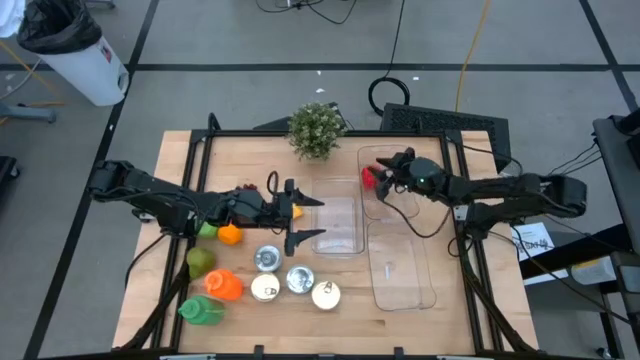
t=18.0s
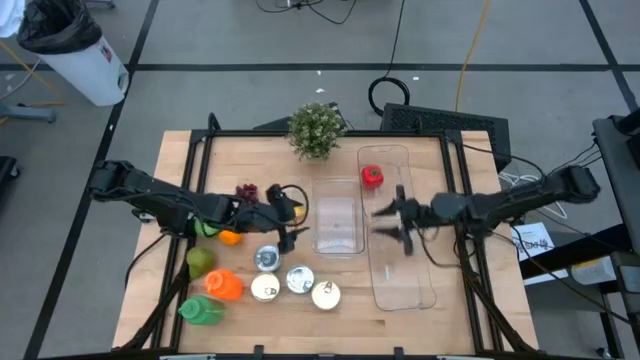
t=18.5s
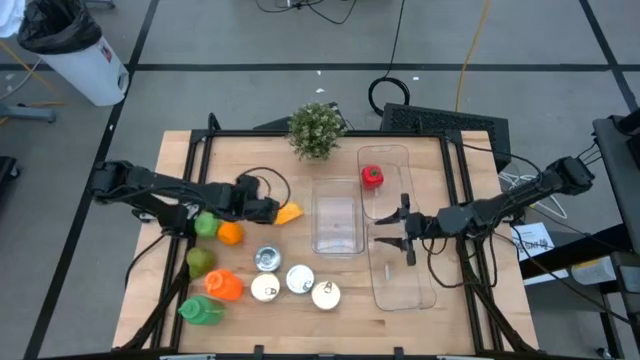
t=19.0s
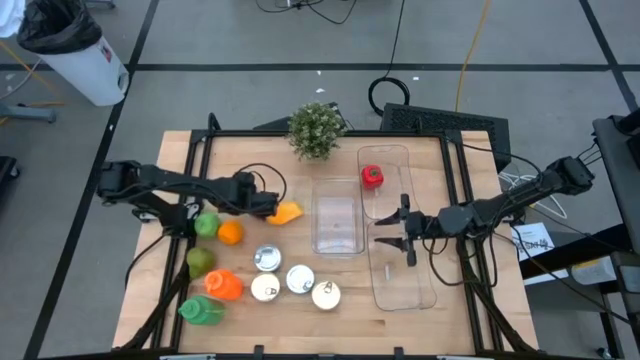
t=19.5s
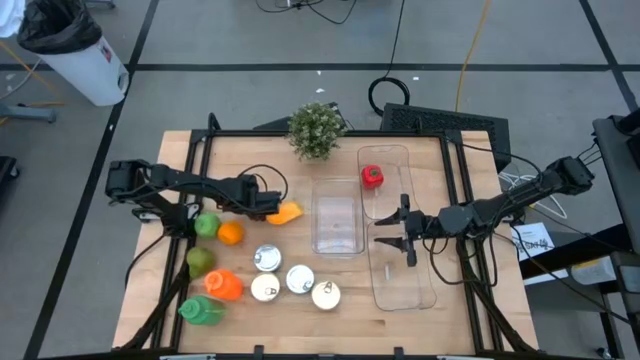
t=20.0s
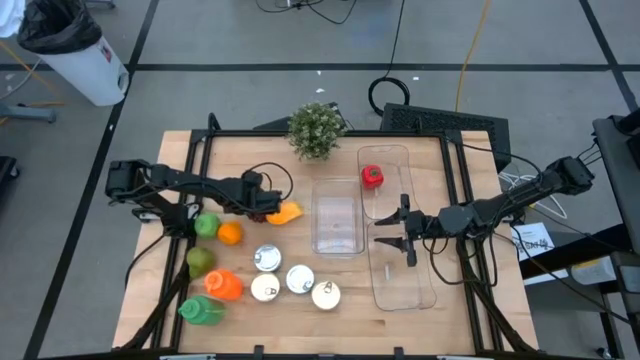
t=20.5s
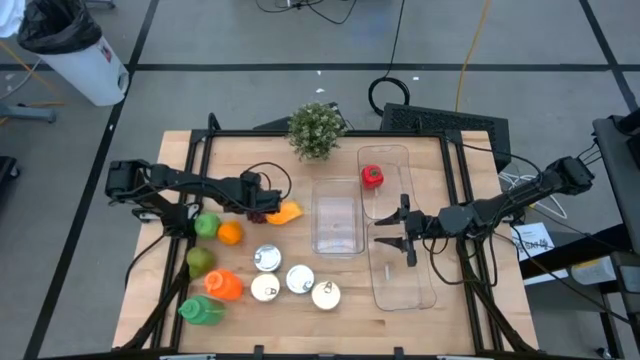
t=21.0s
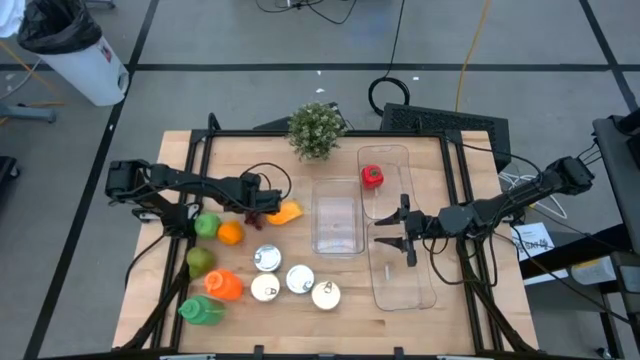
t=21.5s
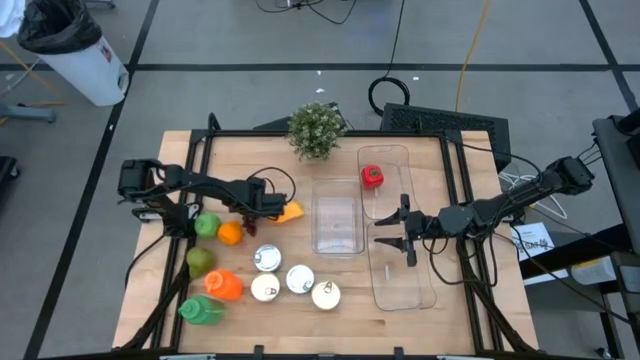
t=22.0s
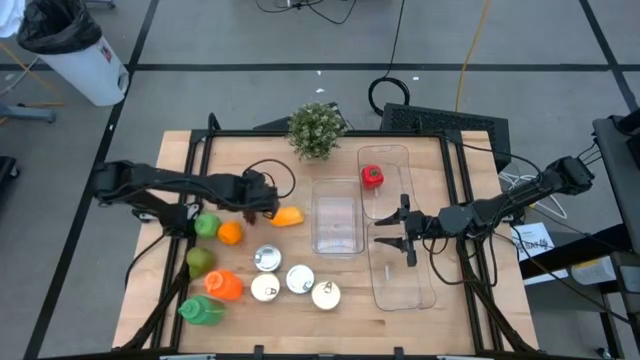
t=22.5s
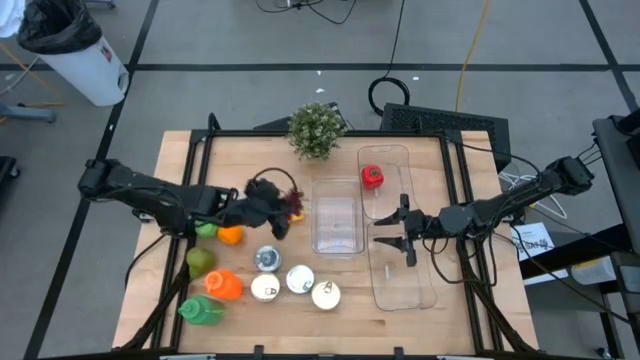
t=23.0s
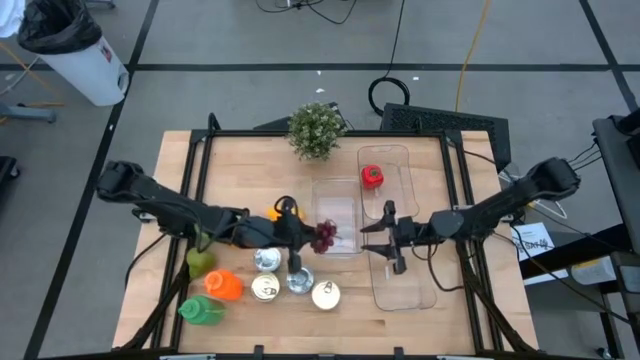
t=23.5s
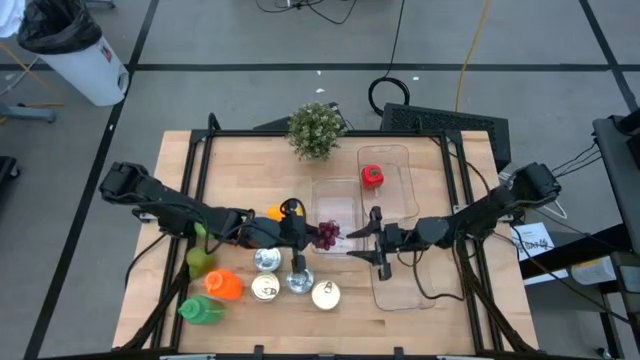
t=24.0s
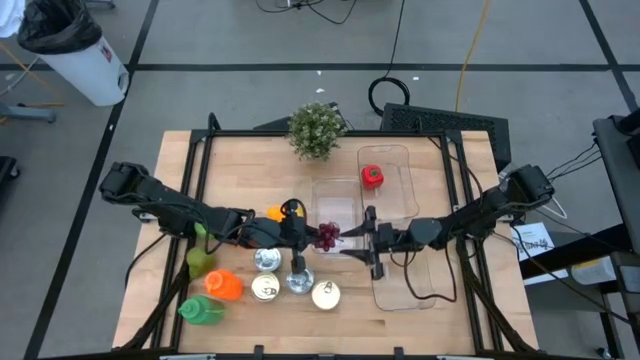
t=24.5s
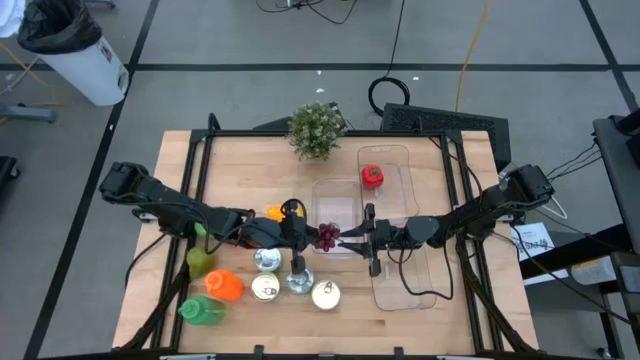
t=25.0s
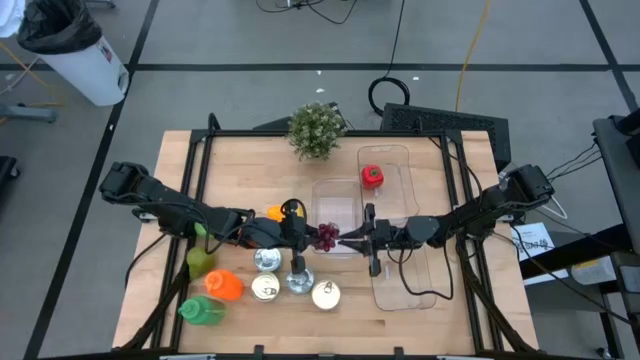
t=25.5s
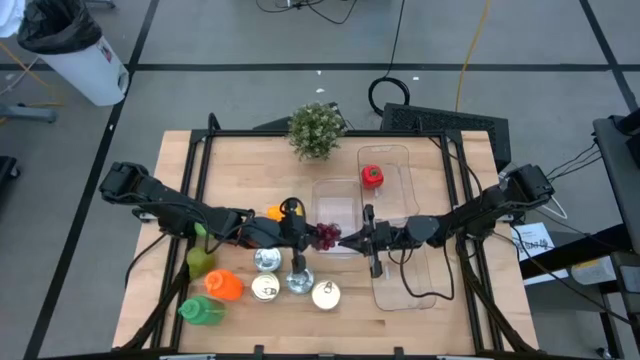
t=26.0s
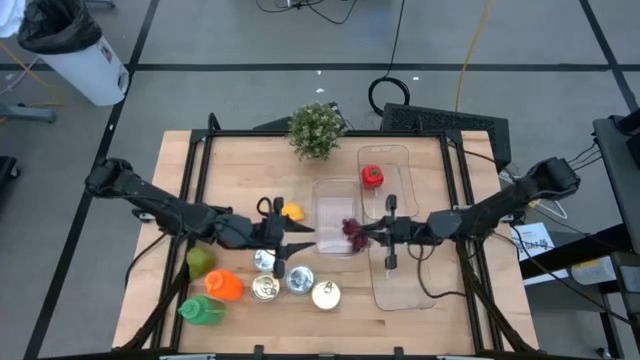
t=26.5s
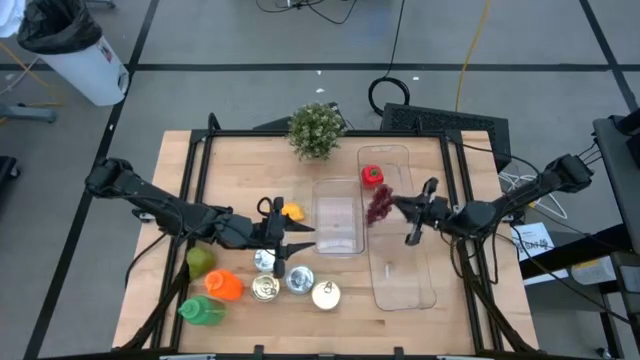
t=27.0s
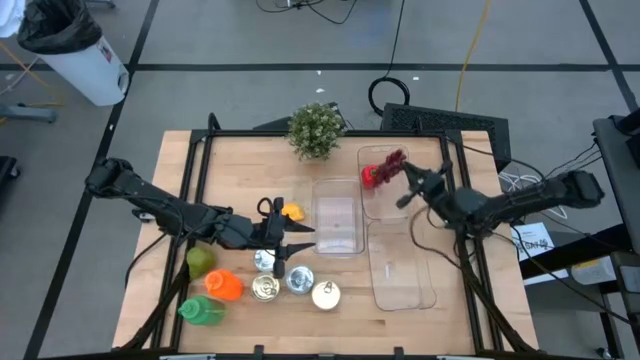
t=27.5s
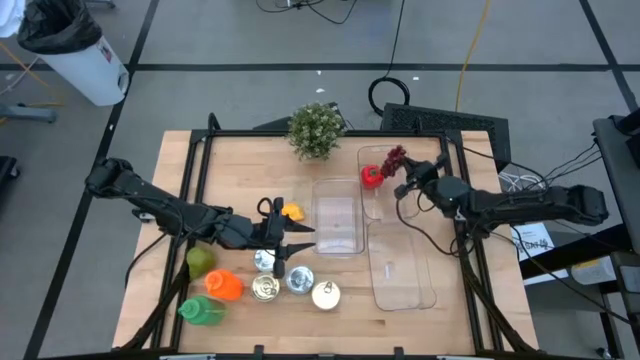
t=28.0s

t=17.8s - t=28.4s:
Task: Pick & Place Food Item
Put the red grapes into the top transparent bin

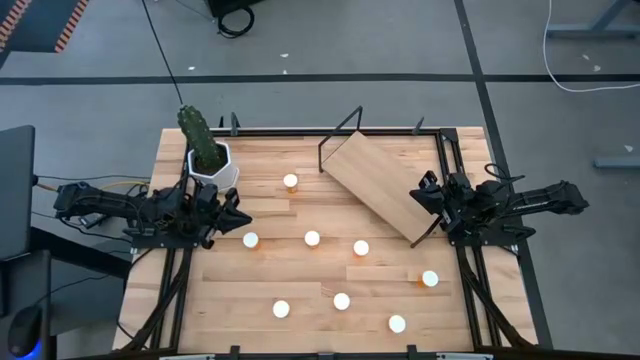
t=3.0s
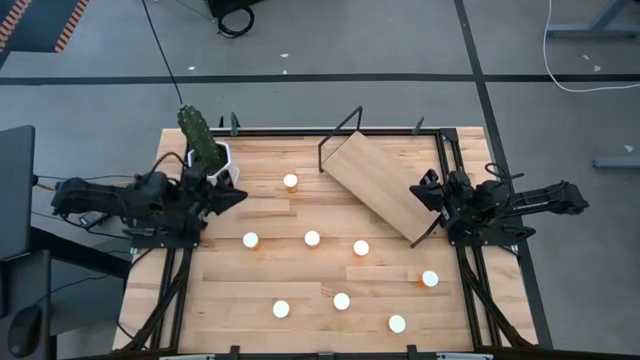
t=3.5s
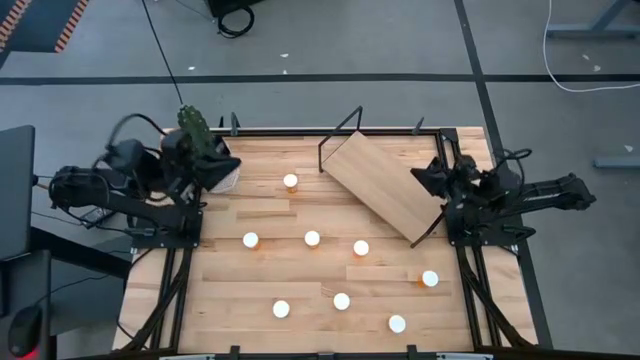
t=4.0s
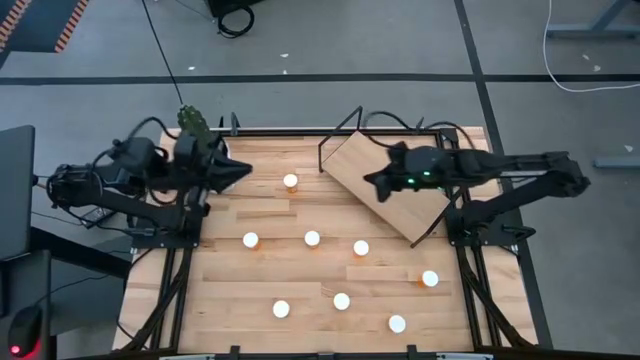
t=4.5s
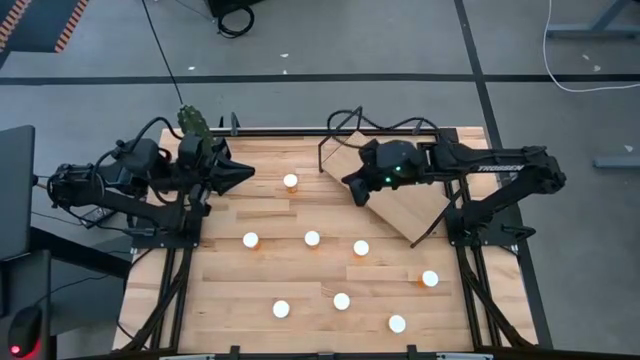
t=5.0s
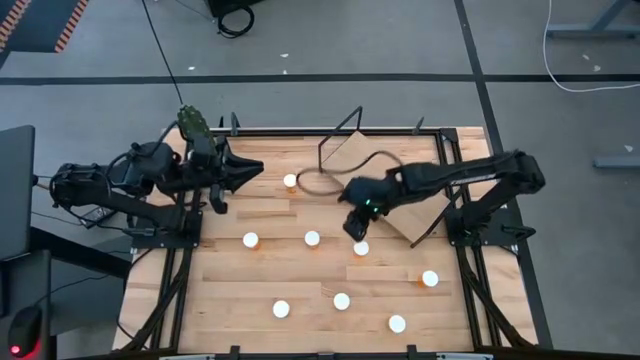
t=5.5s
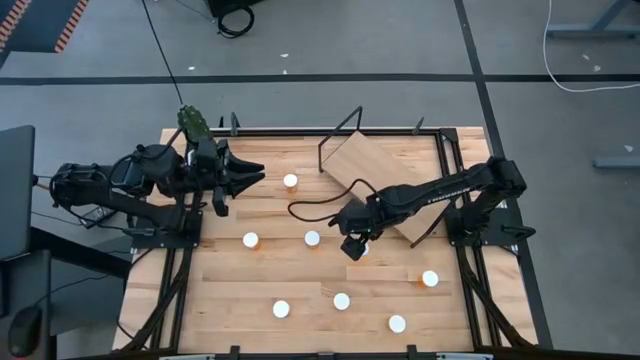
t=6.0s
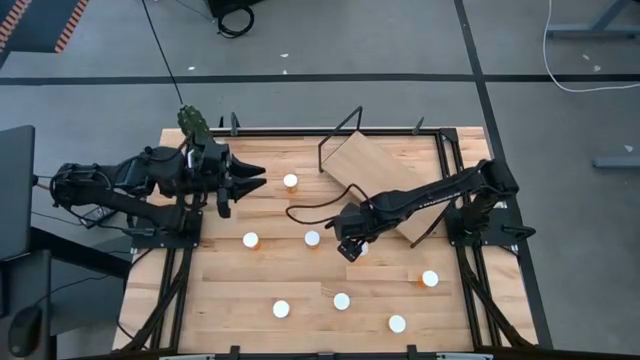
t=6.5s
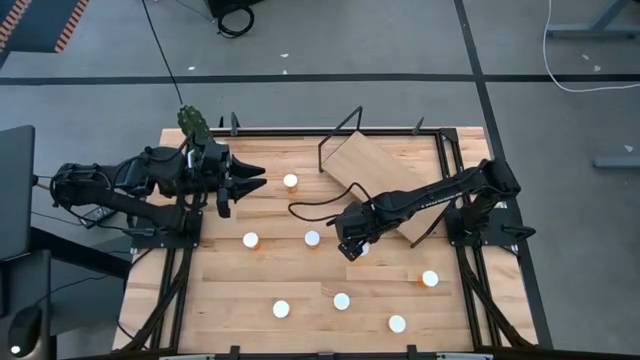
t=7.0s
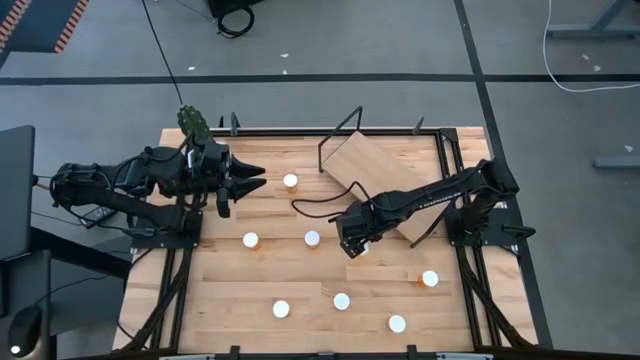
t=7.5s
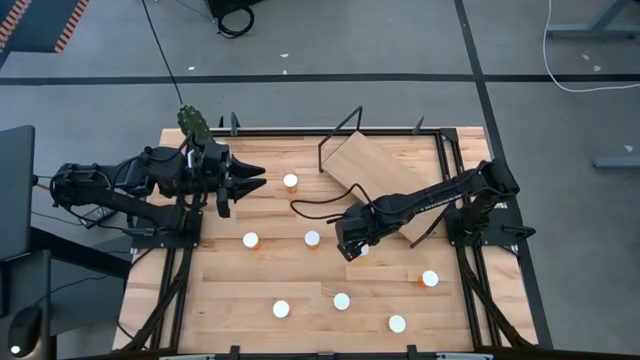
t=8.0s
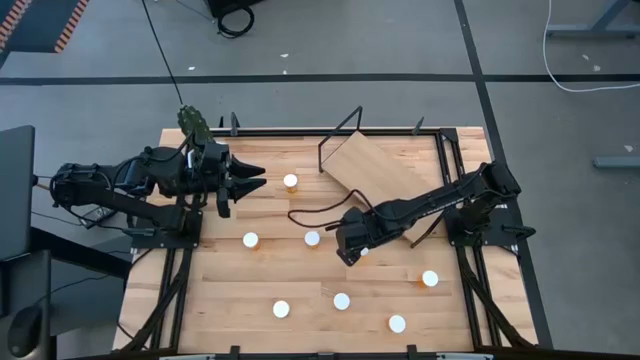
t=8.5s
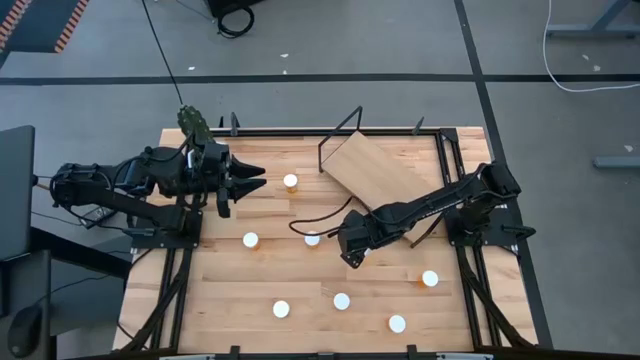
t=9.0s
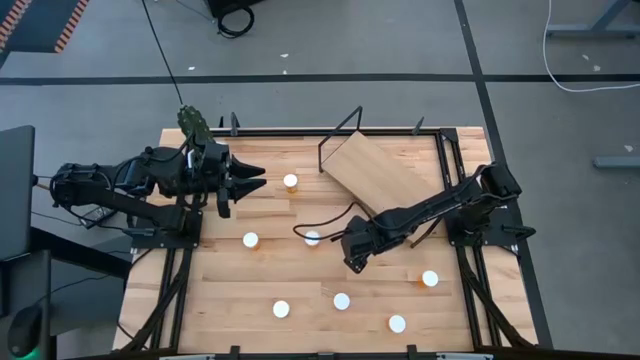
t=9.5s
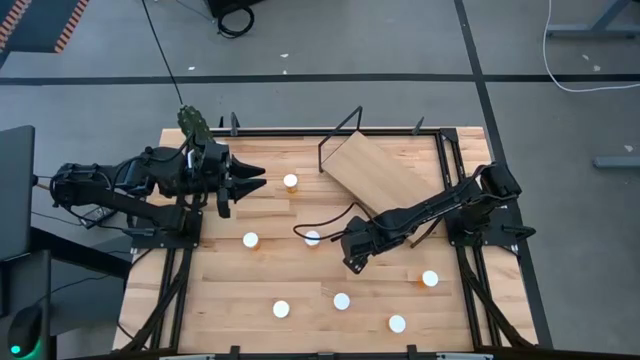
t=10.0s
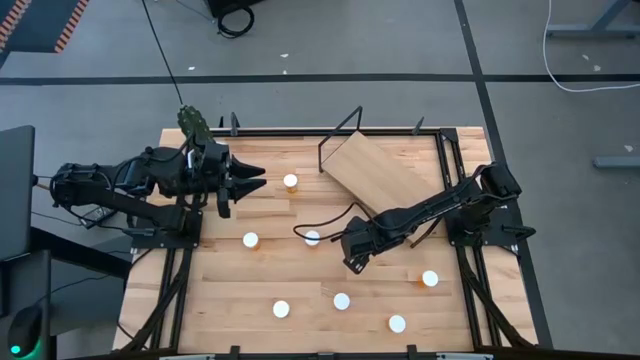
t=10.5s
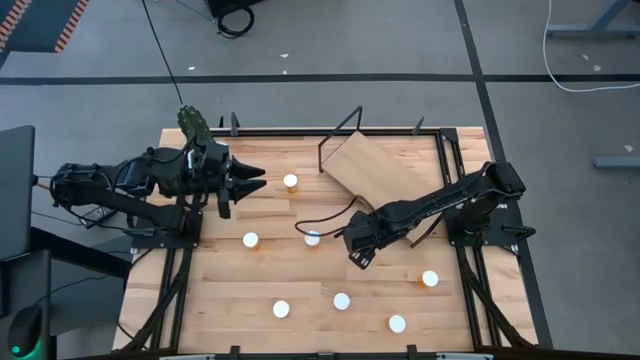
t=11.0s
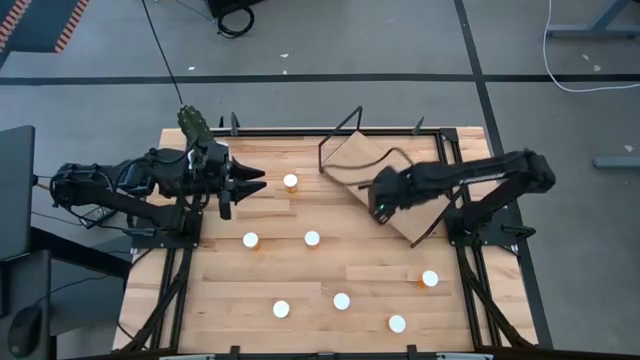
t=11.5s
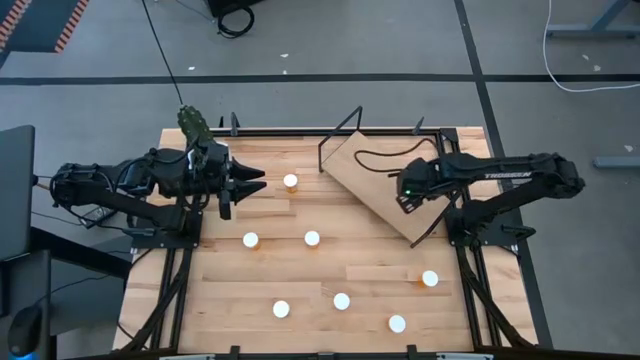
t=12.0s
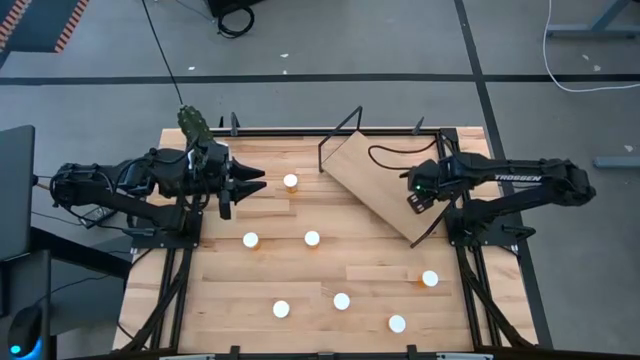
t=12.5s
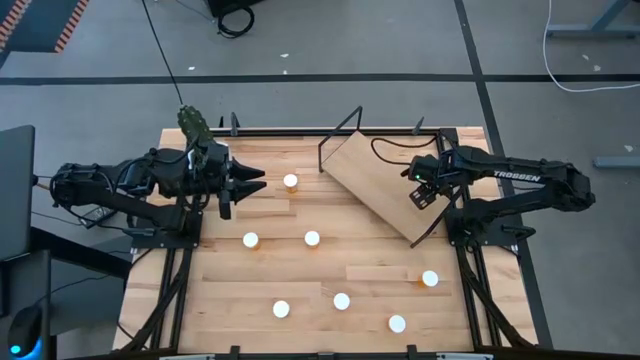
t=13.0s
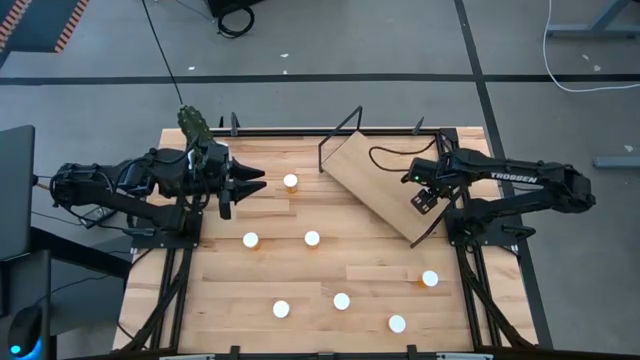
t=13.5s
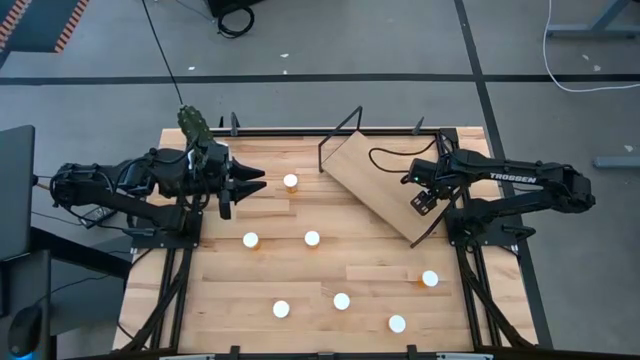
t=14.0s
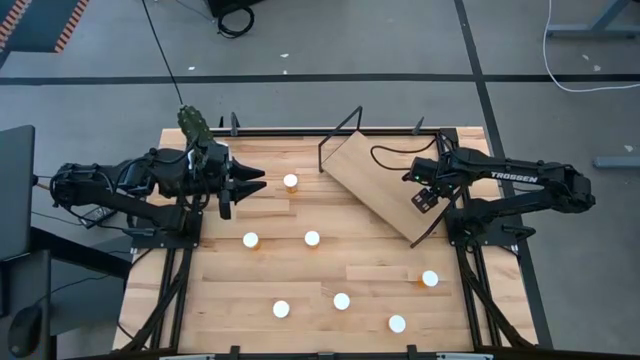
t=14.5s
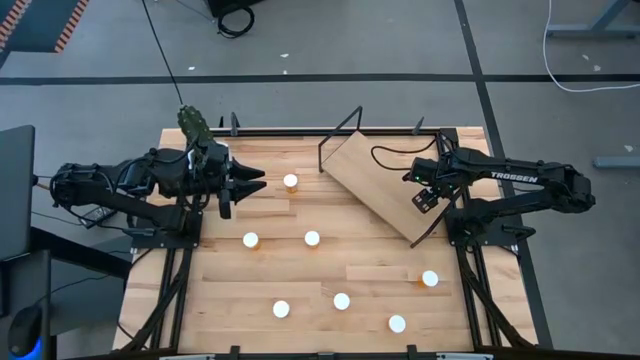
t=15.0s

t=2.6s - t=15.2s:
Task: Pick and place medicine bottles onto shelf by color
Put the orange pill bottle to the right on the shelf
